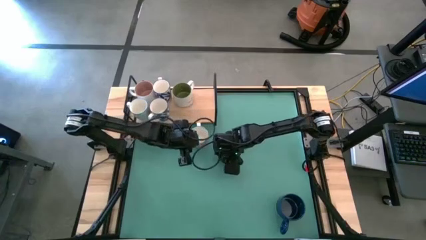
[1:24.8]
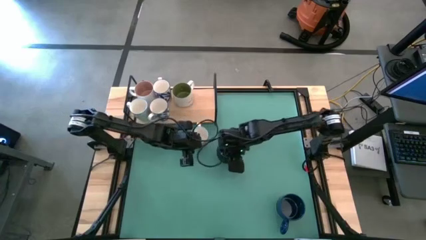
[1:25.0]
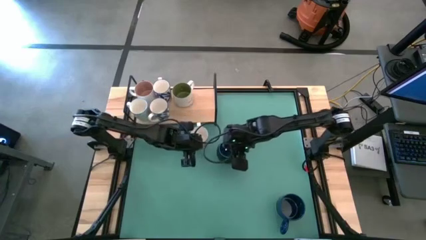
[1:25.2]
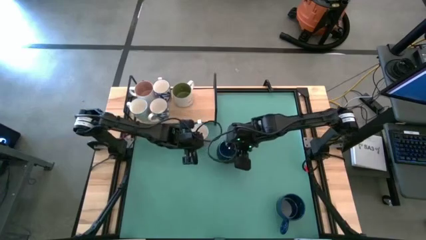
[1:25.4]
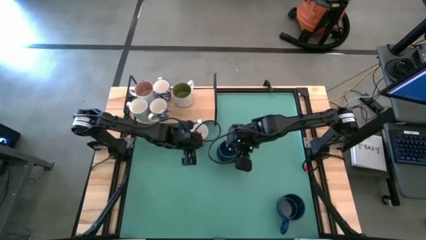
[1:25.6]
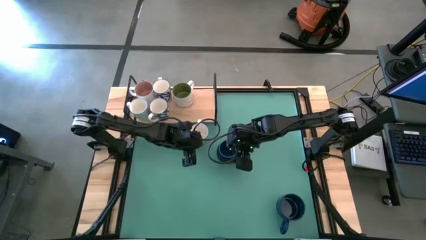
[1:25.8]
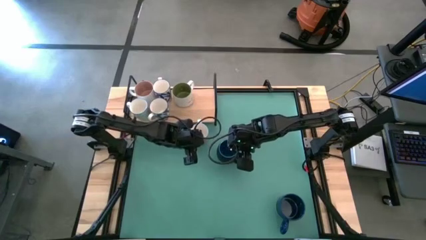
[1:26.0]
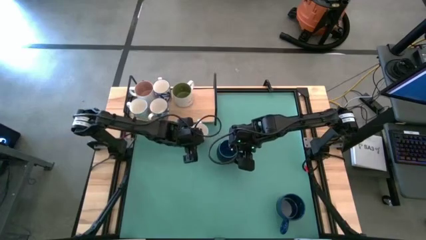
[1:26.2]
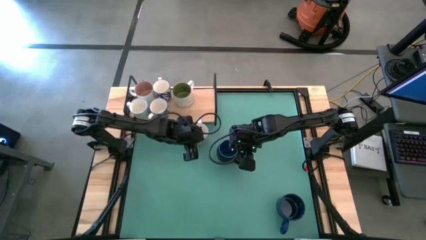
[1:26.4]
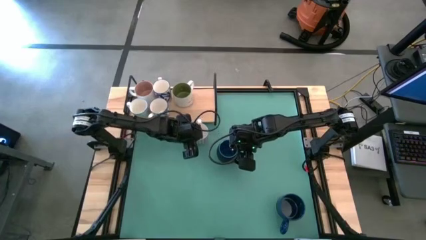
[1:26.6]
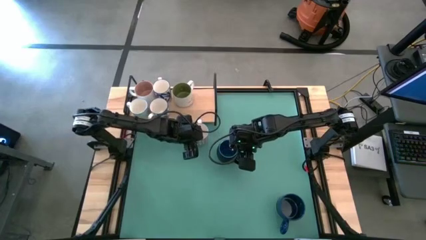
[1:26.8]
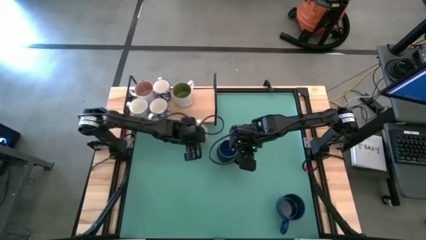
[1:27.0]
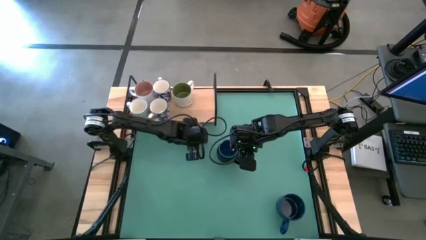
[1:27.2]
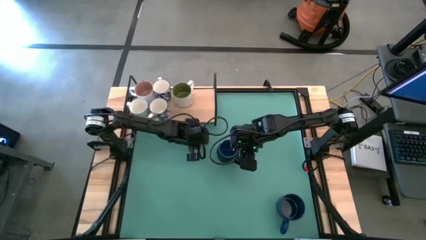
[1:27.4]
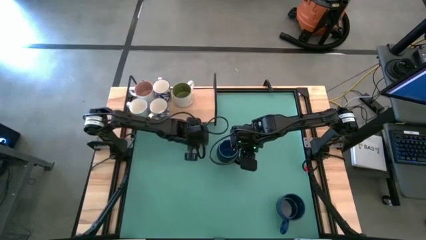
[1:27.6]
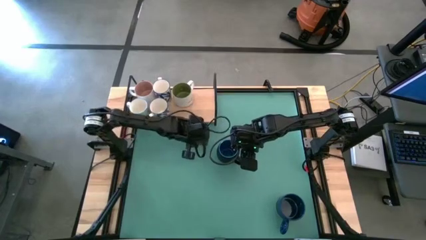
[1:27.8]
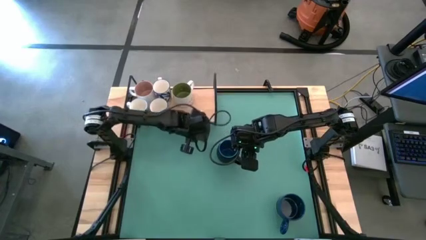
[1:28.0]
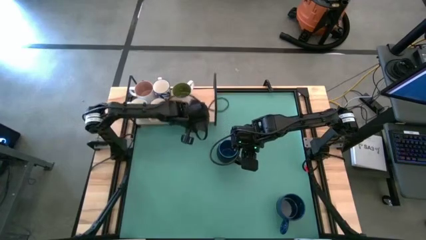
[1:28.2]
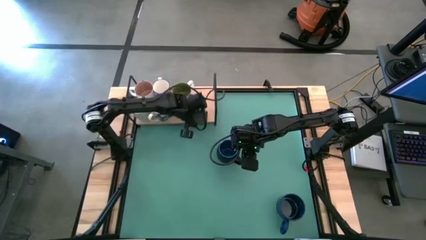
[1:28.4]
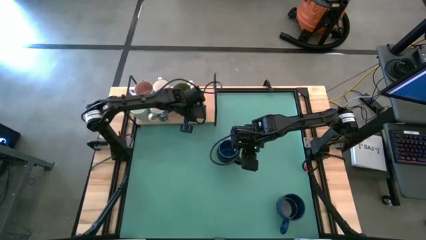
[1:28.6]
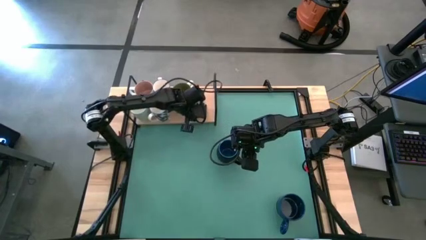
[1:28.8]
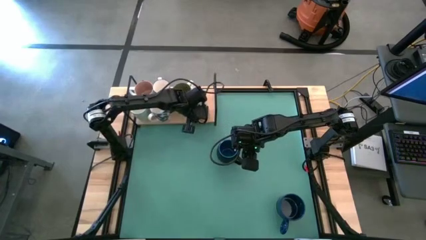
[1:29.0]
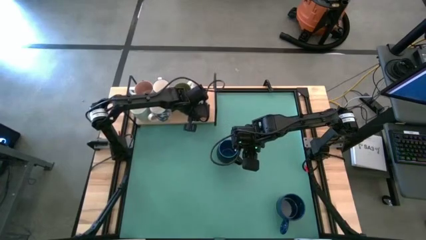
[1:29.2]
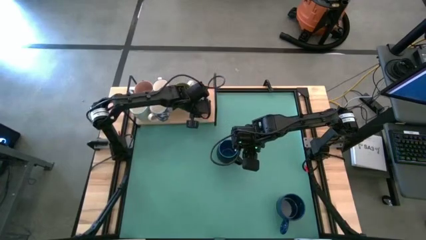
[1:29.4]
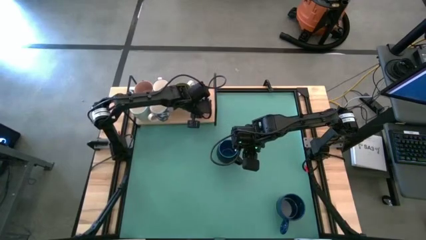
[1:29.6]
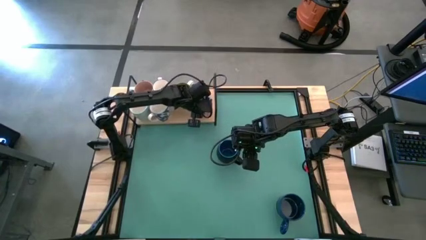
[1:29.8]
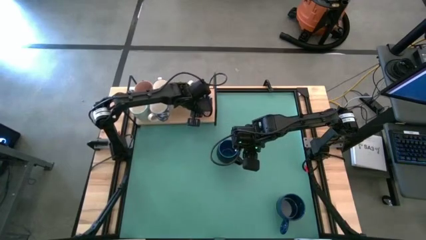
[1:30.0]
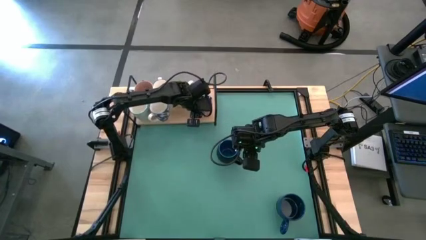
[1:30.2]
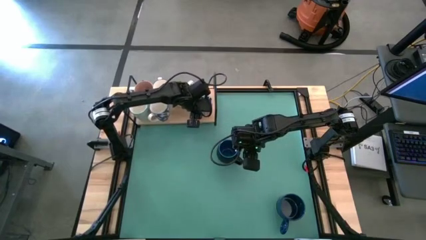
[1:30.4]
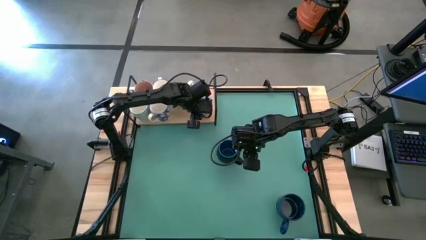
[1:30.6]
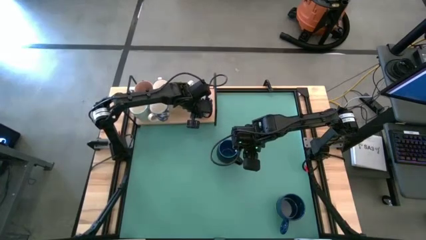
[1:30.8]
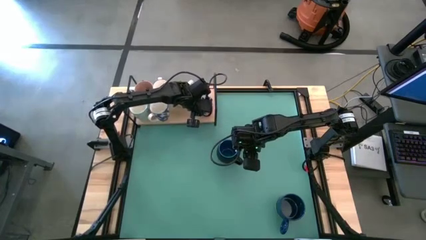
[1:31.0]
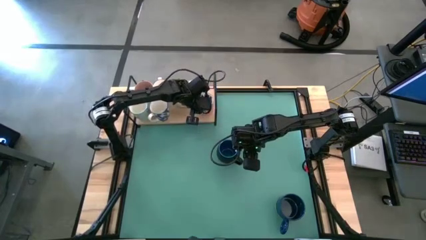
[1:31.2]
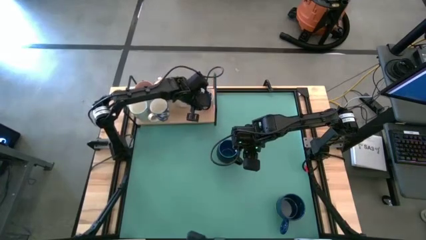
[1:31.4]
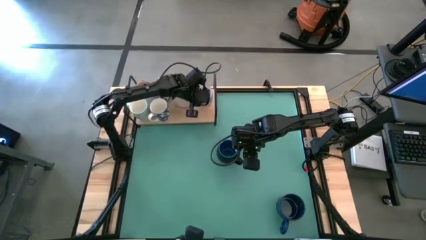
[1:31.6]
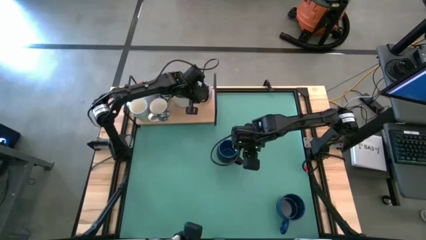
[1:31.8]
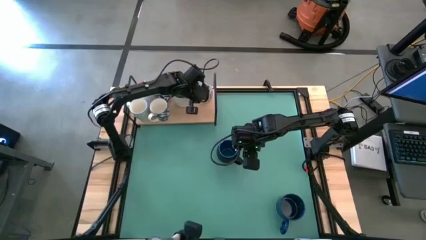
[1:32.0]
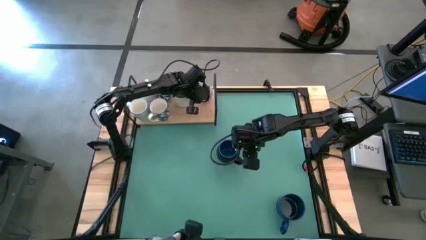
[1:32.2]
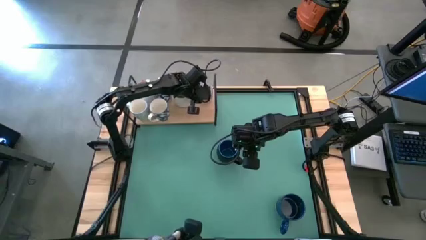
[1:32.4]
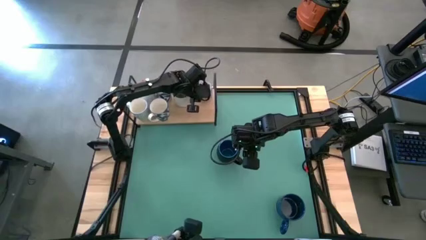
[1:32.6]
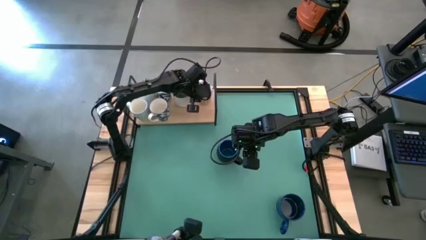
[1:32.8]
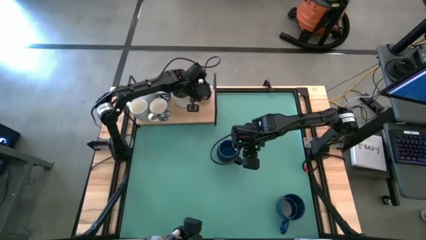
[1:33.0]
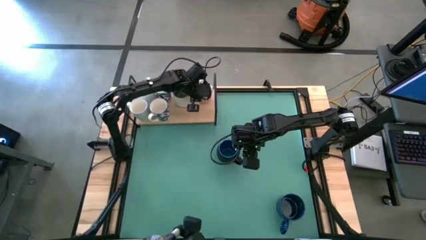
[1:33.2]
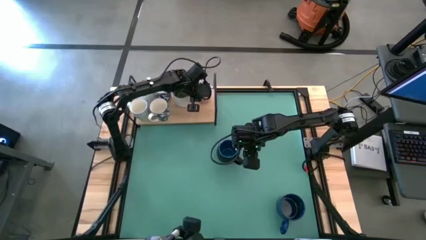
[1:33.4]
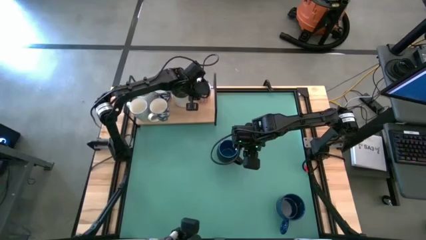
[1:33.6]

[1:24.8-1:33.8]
Task: Place coffee mugs
Put the red patterned mug on the shelf

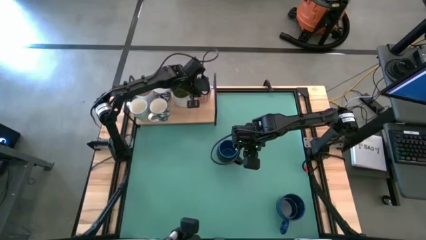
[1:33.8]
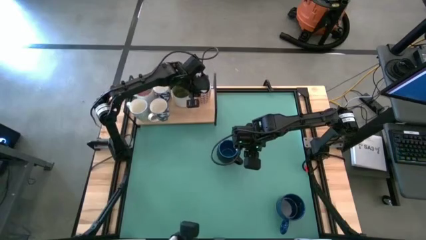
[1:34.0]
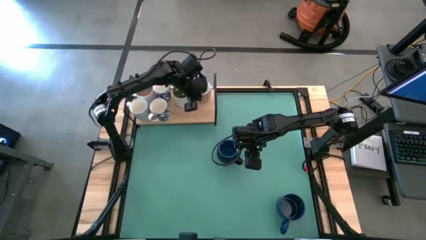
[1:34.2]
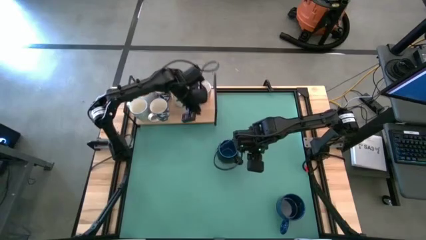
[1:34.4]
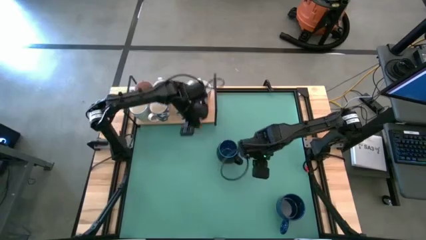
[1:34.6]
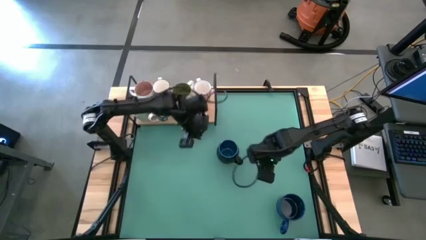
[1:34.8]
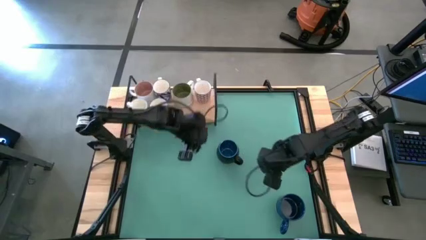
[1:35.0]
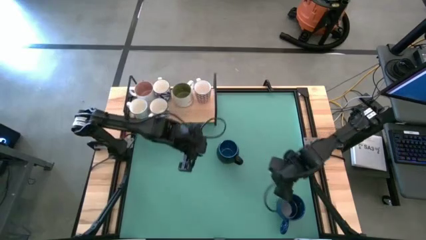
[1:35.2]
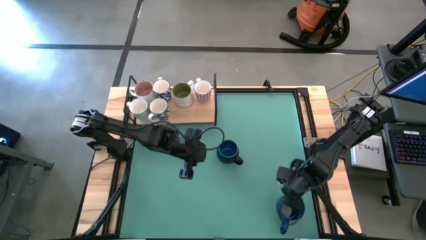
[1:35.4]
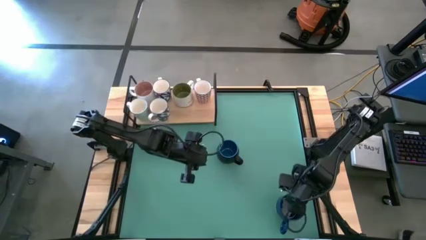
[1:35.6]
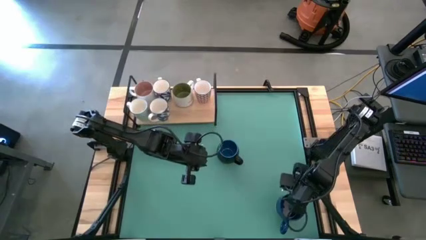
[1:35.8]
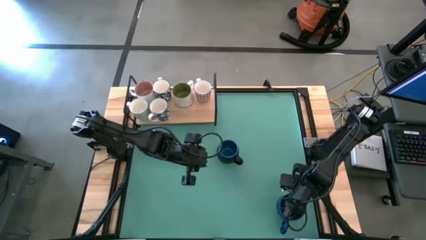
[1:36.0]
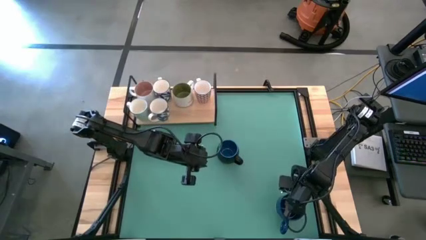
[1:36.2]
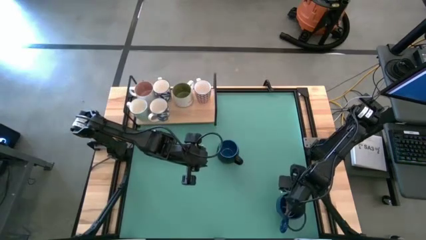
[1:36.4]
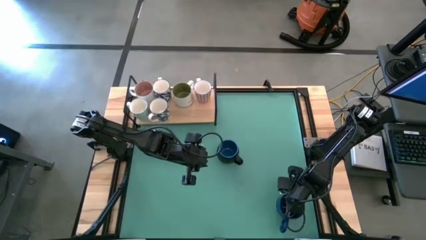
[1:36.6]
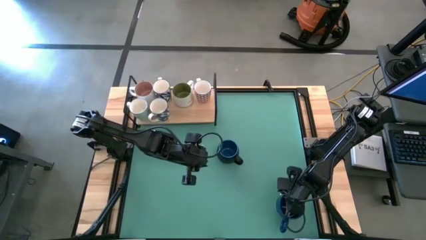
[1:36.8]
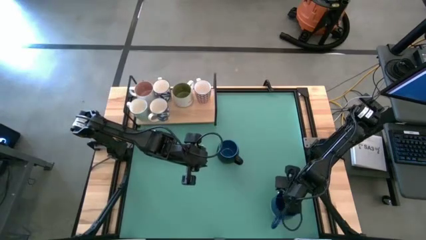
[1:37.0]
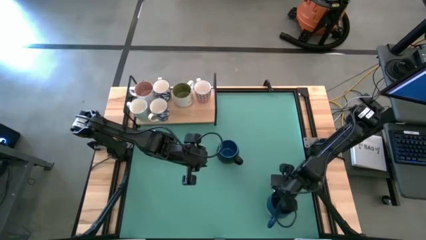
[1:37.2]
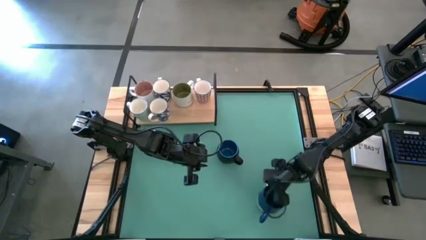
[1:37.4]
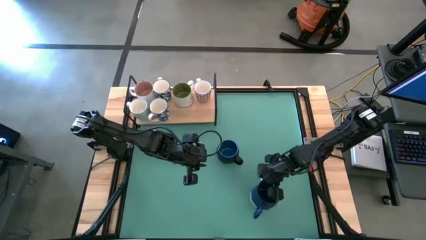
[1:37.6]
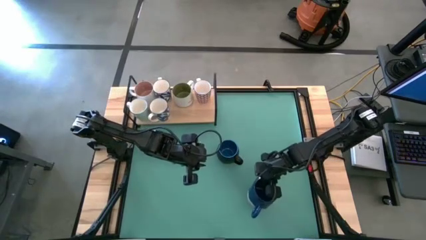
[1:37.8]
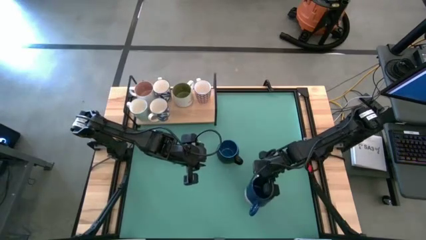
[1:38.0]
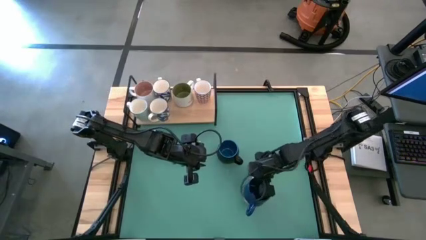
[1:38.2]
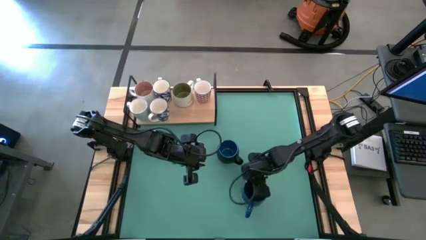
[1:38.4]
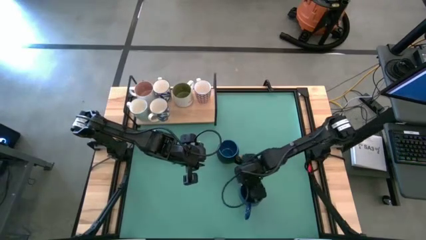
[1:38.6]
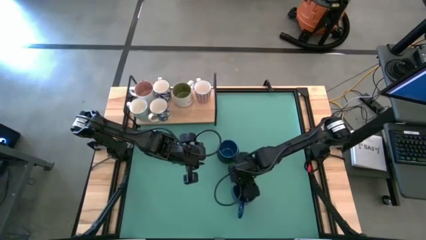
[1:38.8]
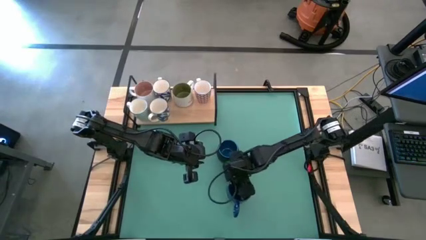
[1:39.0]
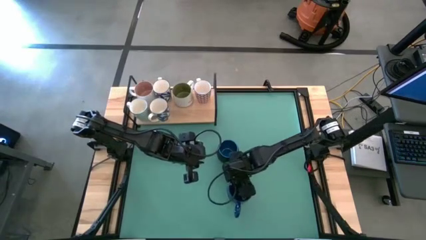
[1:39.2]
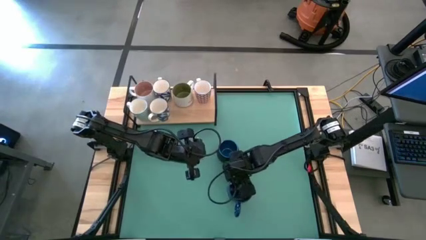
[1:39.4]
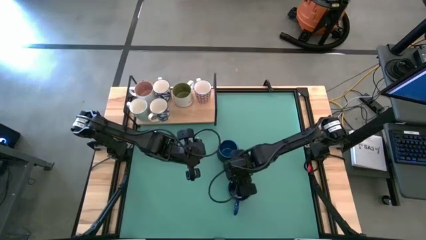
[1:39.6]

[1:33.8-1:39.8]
Move the blue mug to the middle bottom of the table

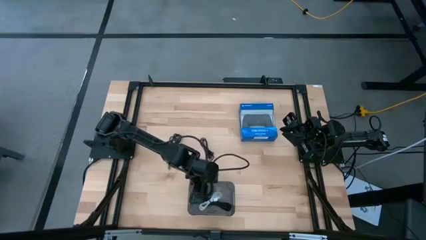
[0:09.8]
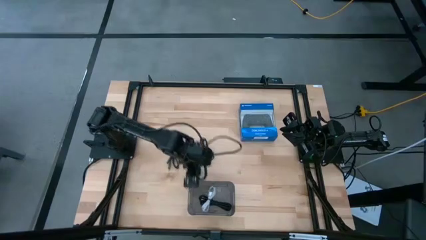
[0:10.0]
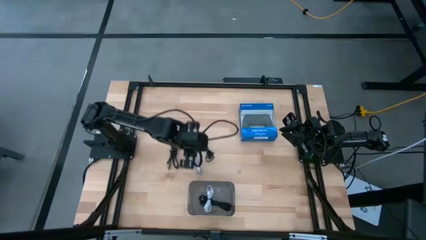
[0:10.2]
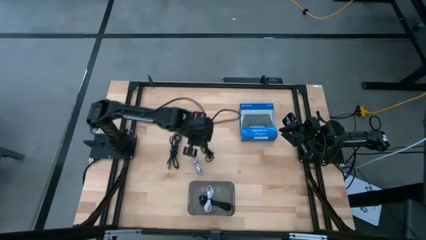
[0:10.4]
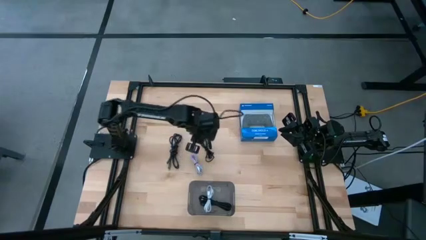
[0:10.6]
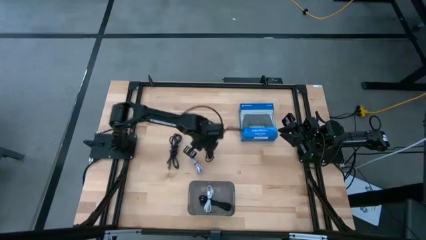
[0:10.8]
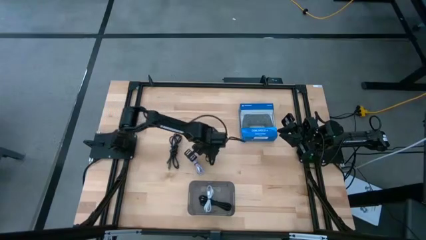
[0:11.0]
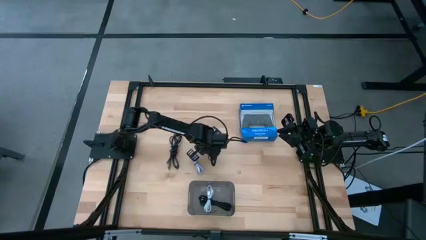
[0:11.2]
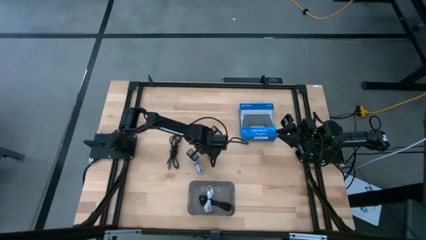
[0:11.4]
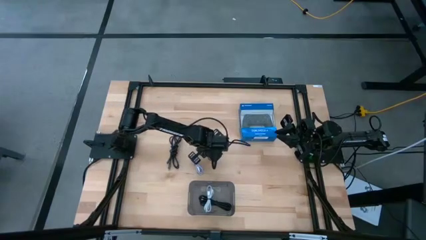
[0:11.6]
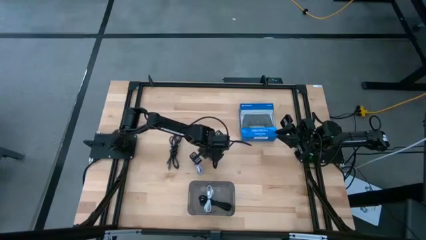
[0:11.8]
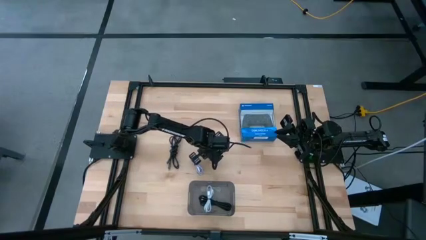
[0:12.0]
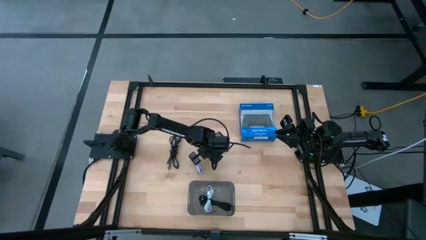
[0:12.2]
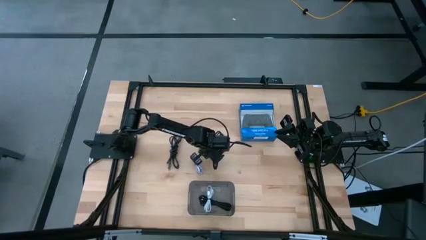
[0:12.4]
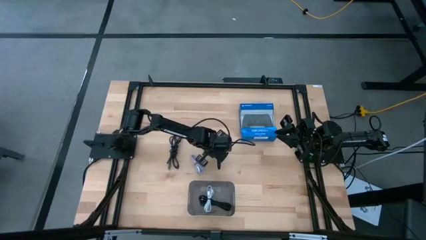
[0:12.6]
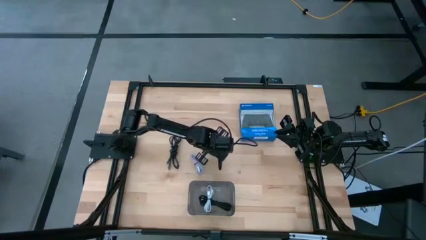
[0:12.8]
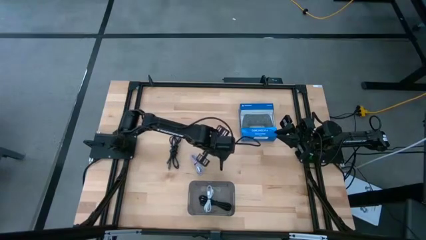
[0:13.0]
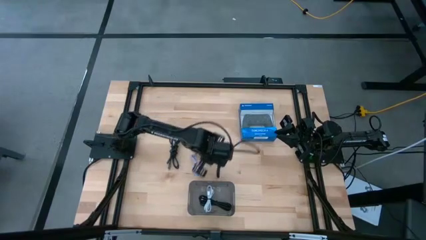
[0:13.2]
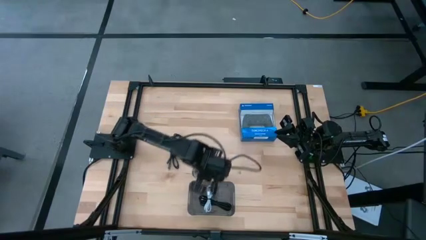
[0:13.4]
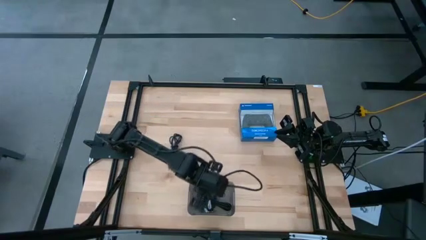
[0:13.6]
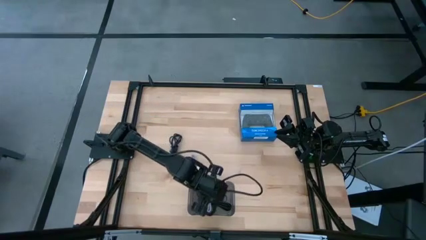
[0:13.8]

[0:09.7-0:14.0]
Task: Pick and place USB-C Cables
Put the right black charger cable into the black bin
